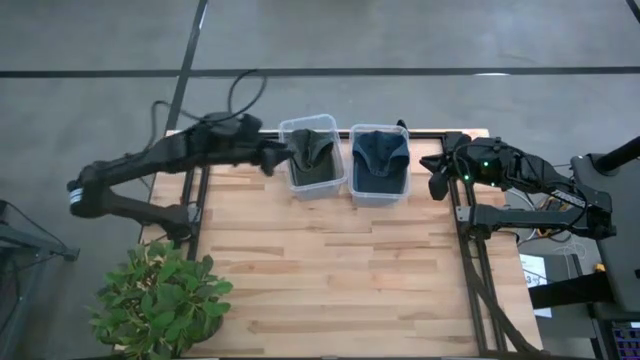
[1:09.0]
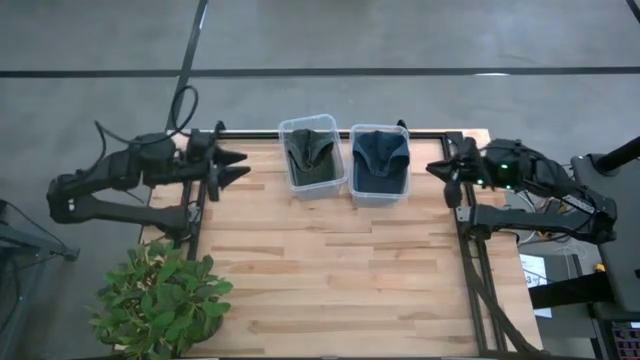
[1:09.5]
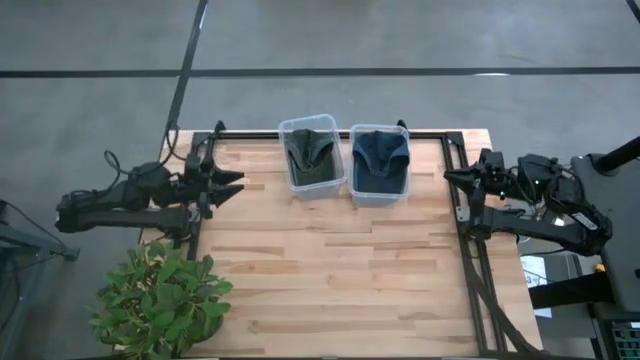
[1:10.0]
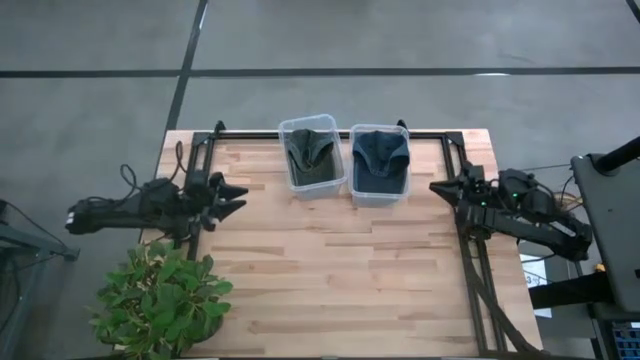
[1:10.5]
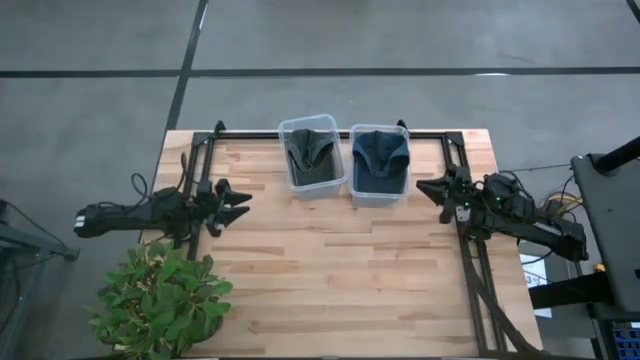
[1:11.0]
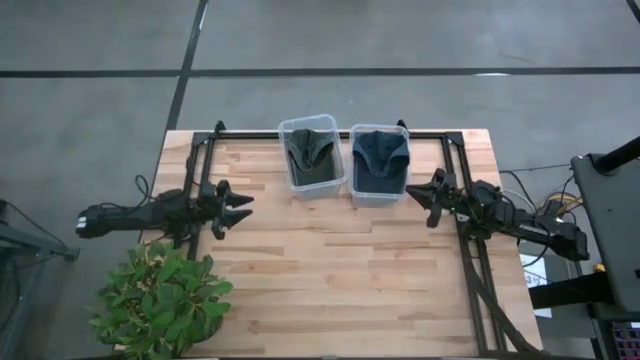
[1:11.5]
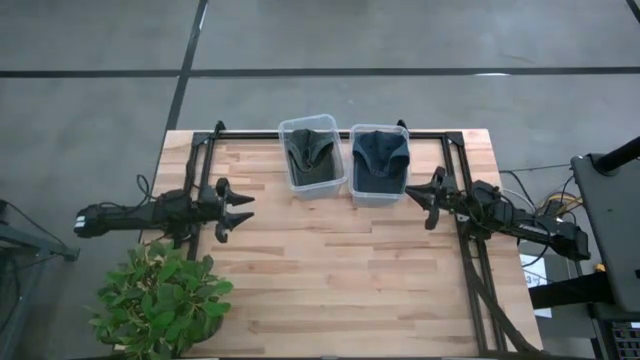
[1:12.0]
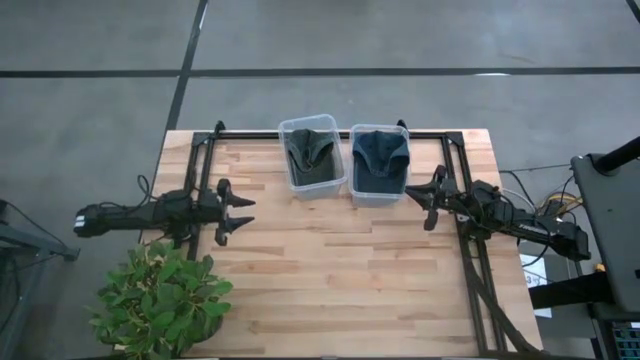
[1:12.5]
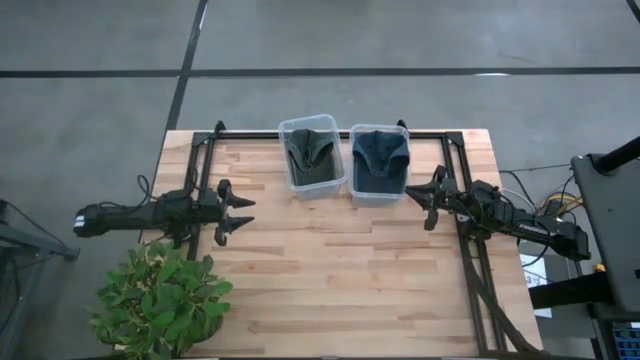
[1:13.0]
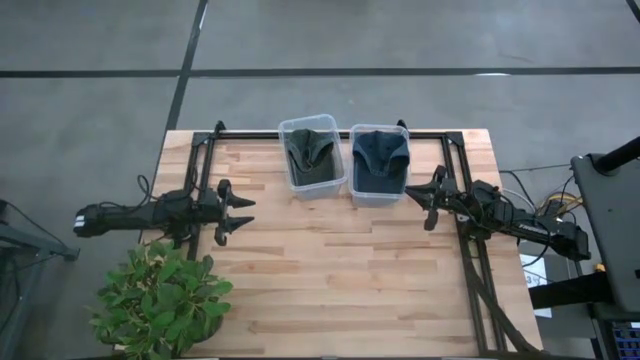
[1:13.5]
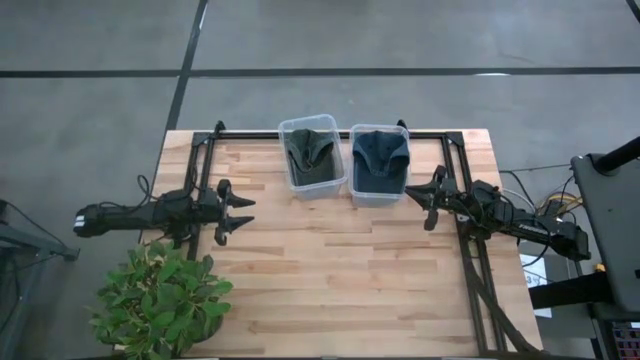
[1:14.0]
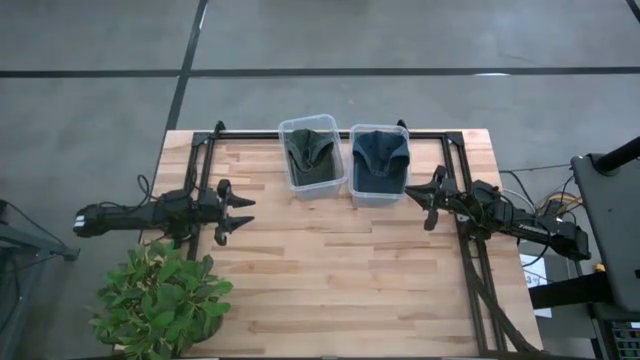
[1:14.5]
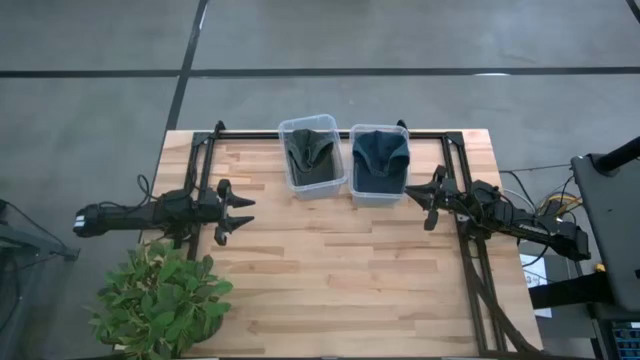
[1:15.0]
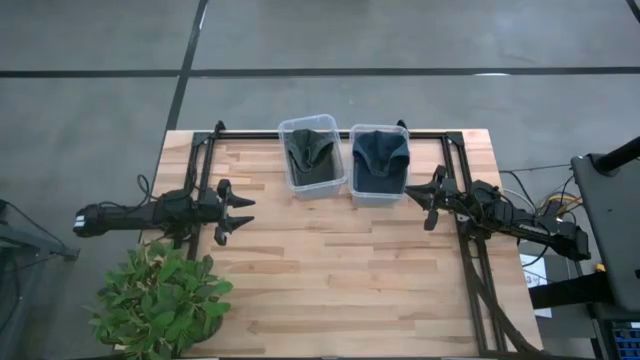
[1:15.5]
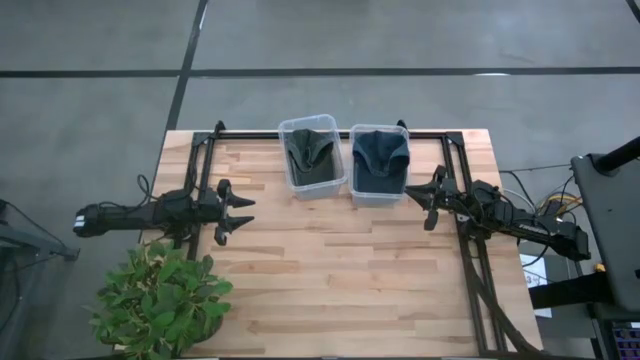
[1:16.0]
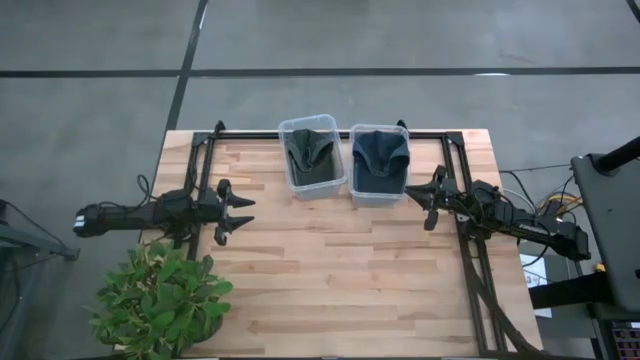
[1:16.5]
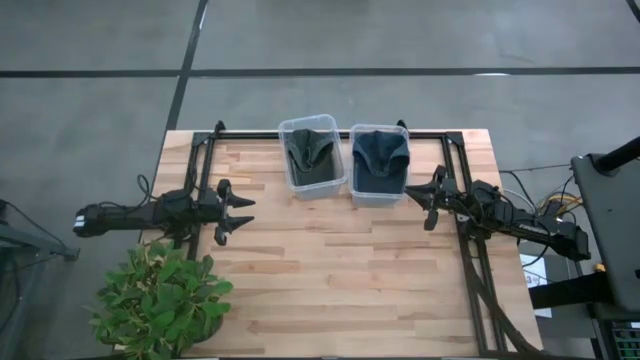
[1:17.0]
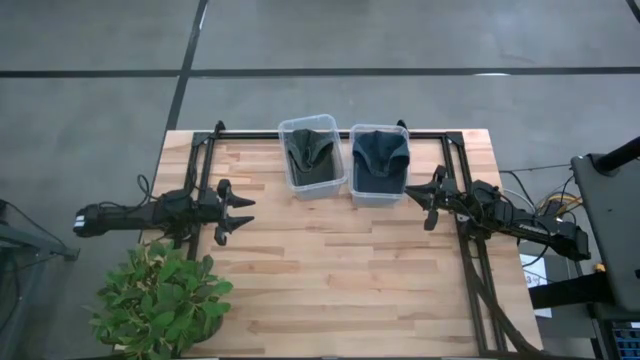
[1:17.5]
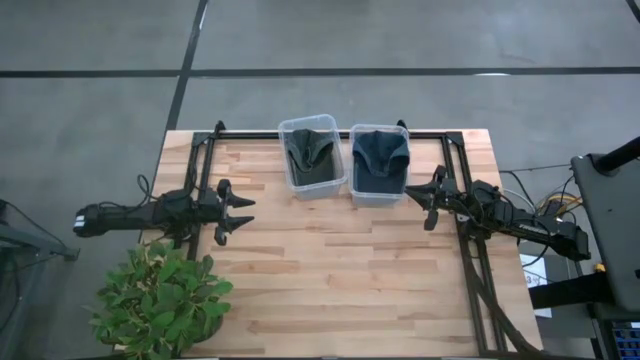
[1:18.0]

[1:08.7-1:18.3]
Task: Pick & Place hat
Return to home position

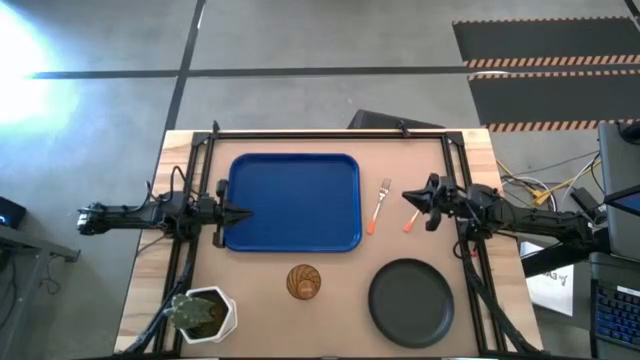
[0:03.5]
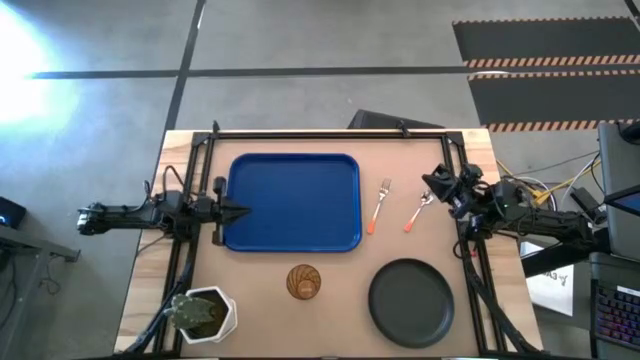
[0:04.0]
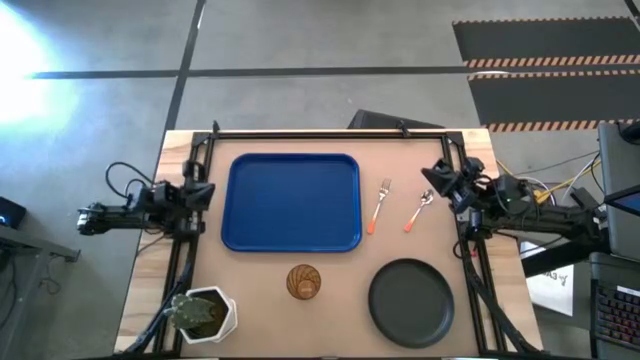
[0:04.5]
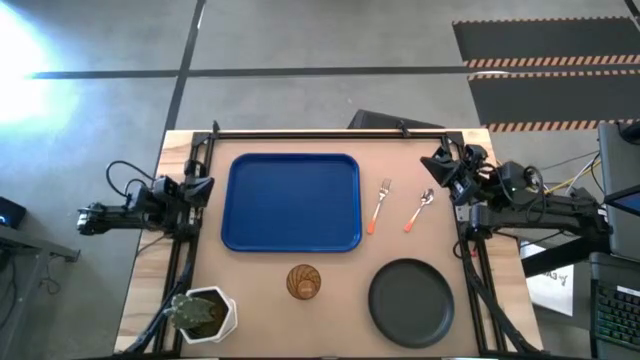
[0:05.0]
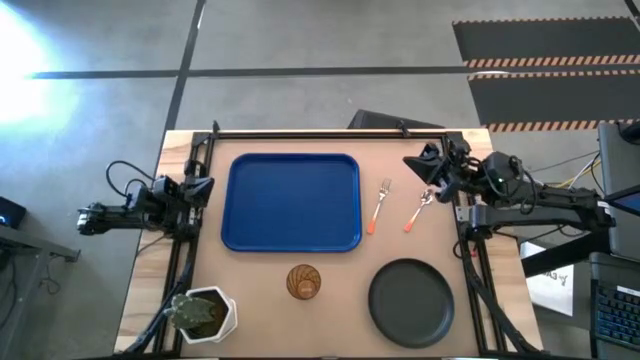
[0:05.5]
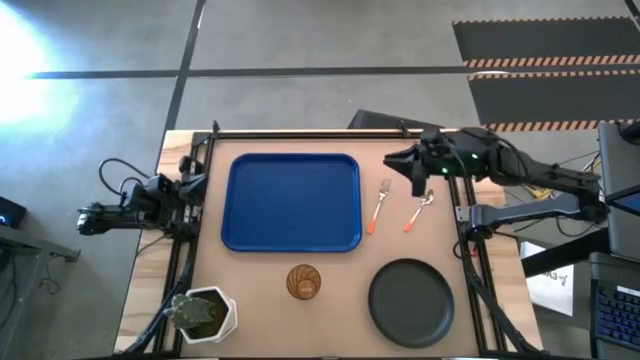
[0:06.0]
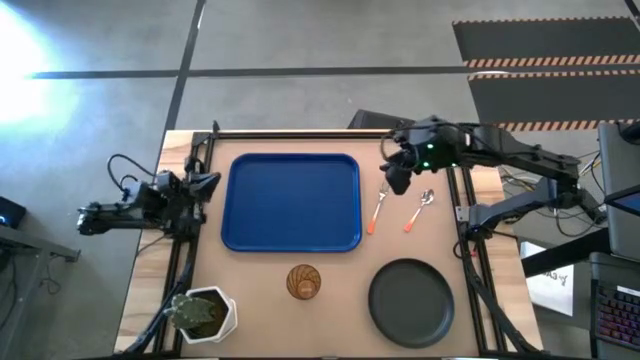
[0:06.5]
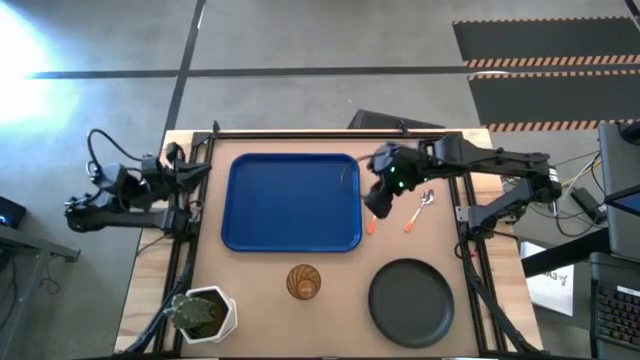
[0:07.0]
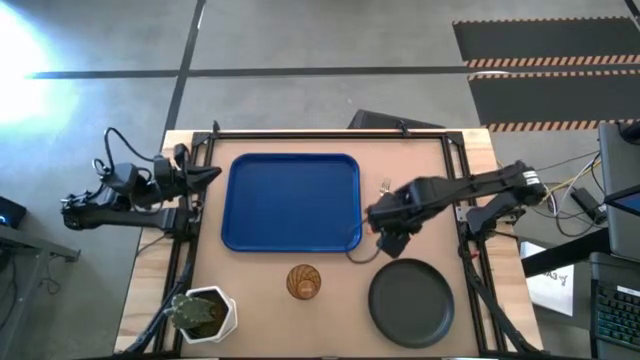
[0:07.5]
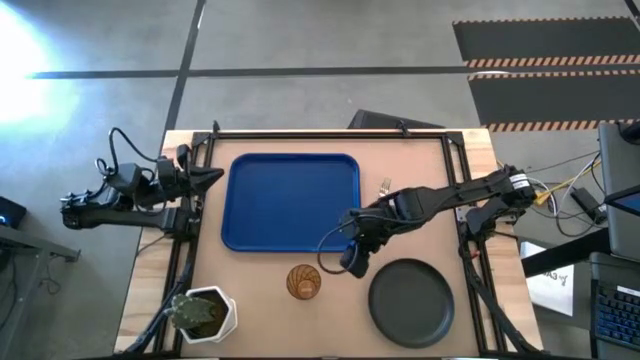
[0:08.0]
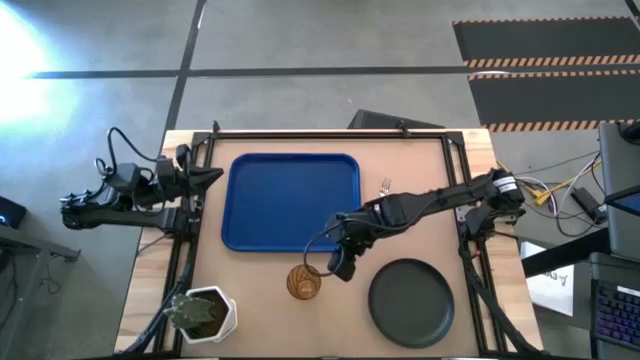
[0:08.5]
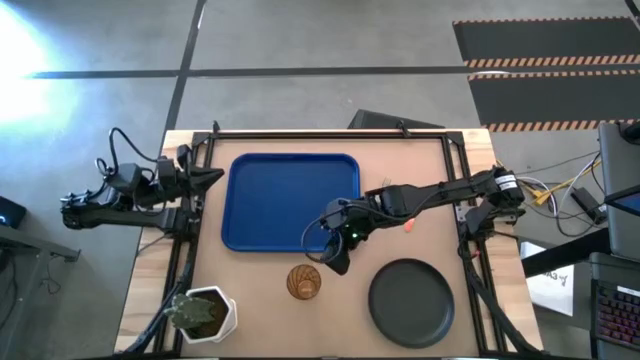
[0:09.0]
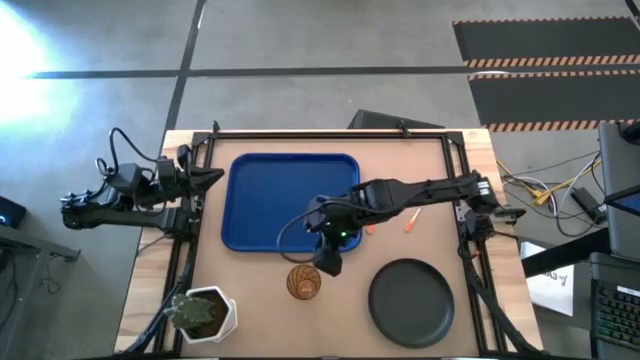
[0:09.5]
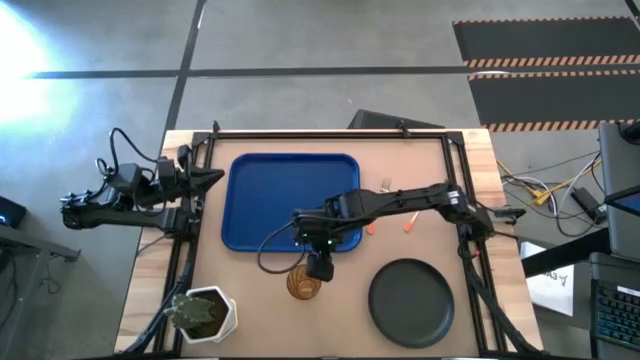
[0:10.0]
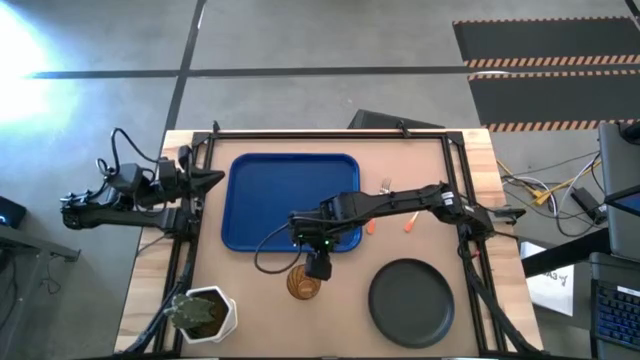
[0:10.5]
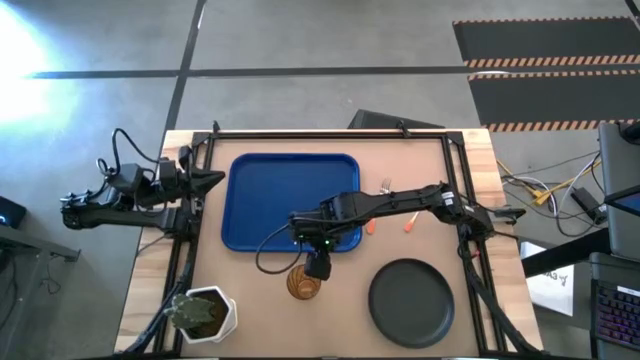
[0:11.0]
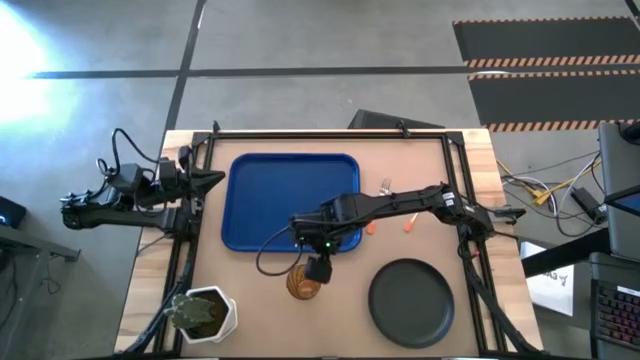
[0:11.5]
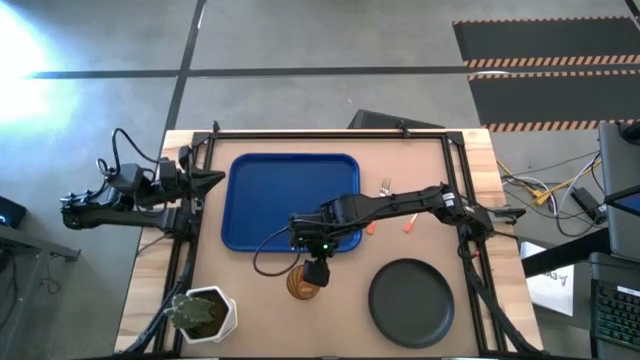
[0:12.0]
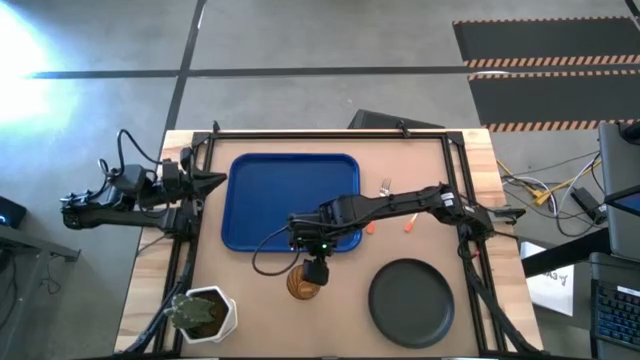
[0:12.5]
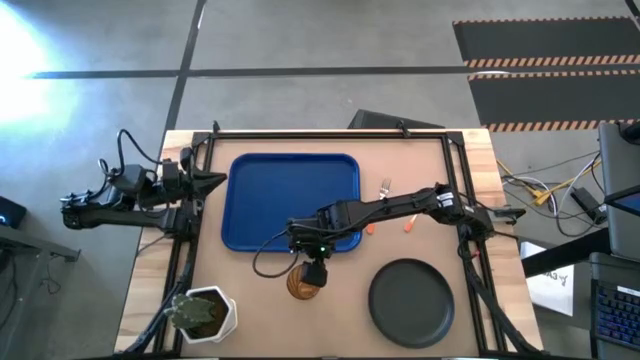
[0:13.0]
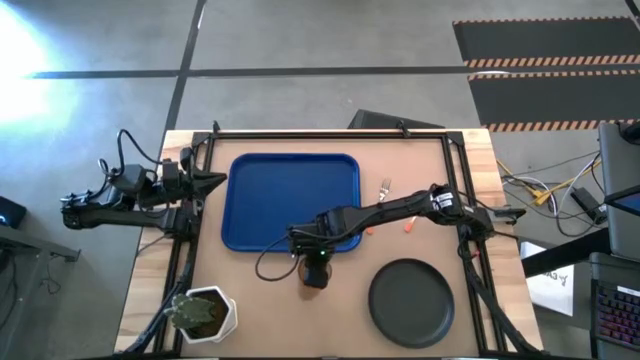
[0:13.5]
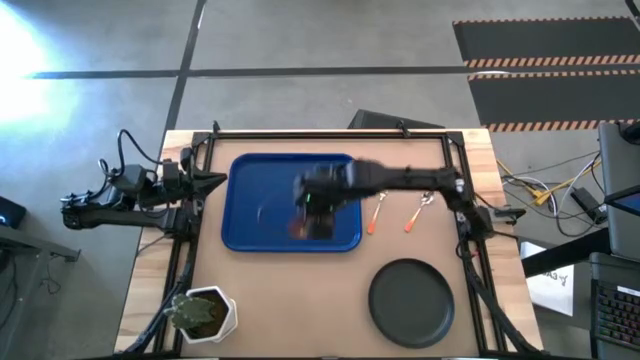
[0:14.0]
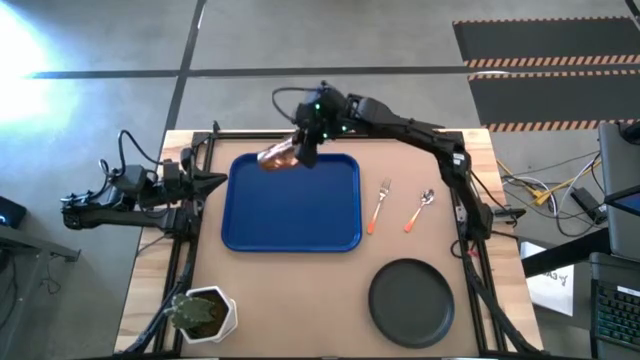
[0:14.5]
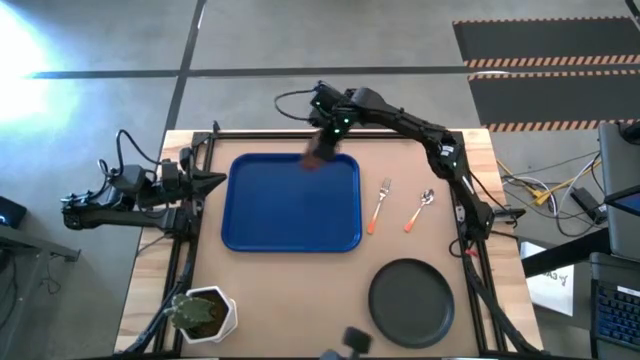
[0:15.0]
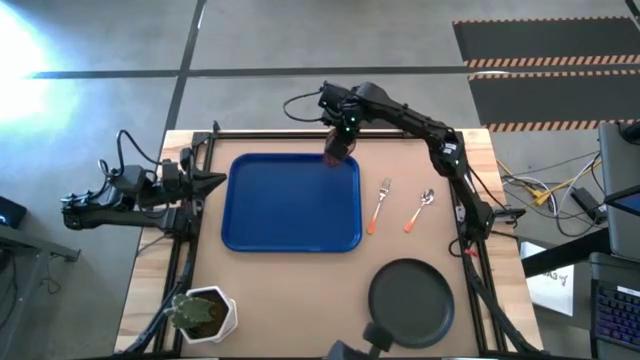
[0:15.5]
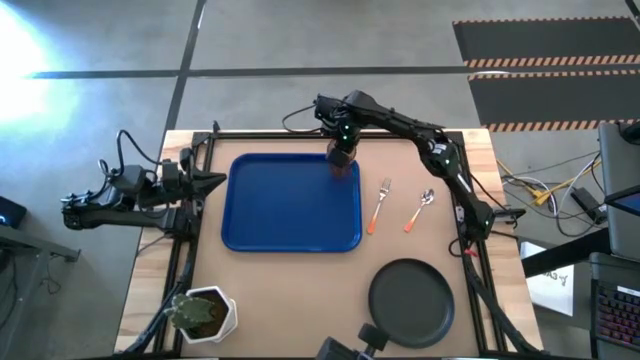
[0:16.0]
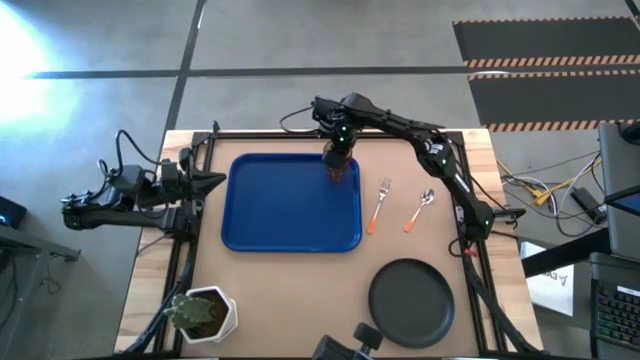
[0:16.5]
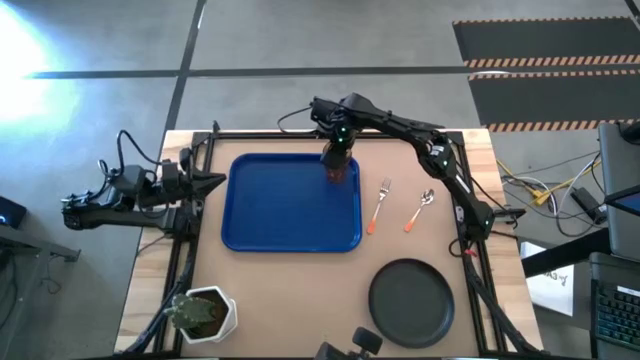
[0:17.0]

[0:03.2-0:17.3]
Task: Pick and place plate/cup/fork/spoon on tray
Put the orange cup on the top right of the blue tray
